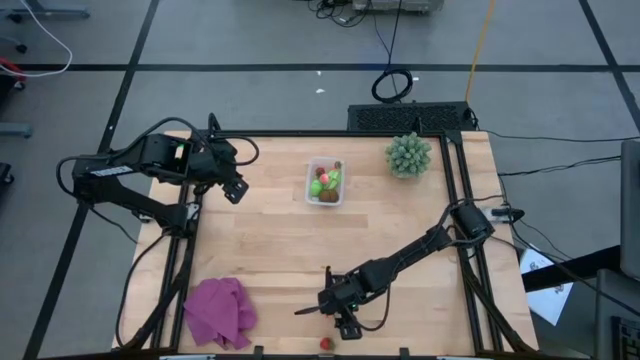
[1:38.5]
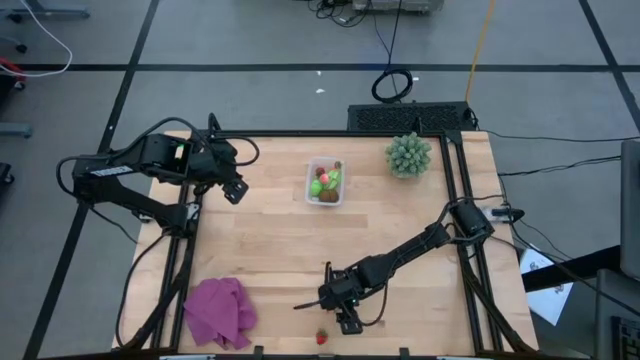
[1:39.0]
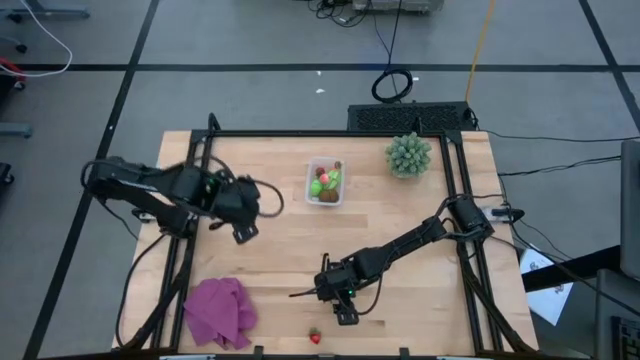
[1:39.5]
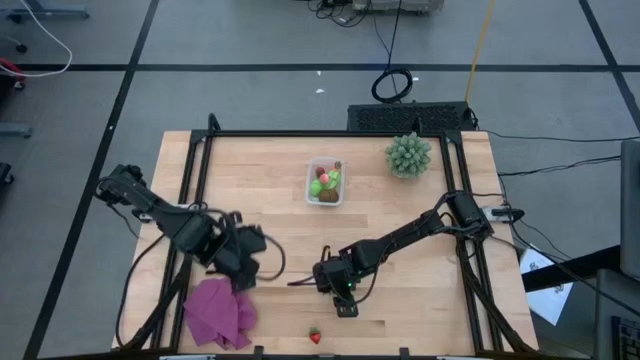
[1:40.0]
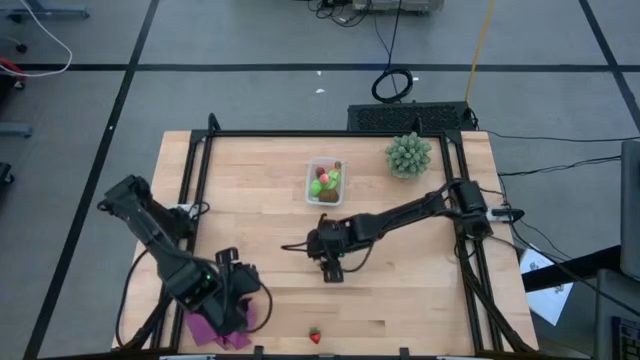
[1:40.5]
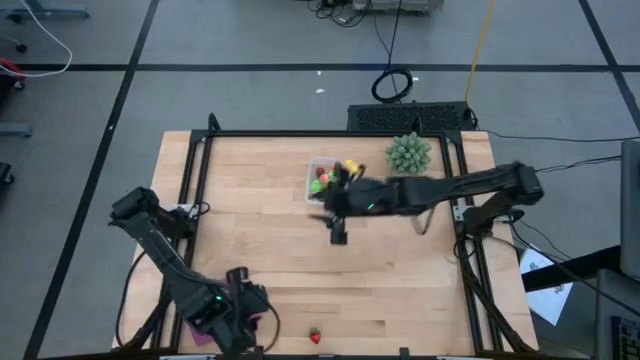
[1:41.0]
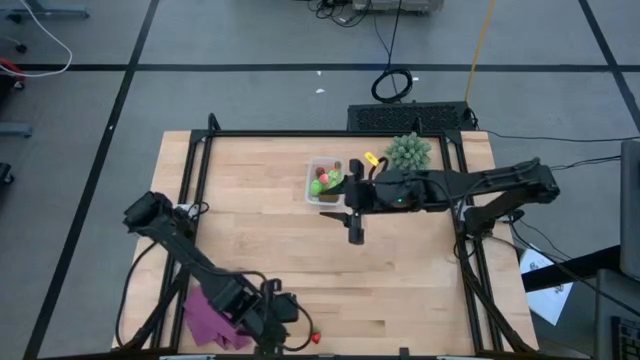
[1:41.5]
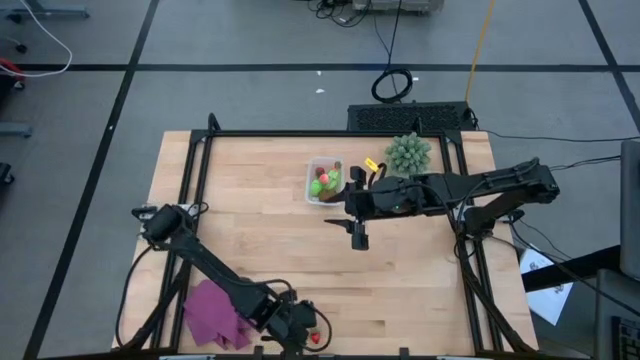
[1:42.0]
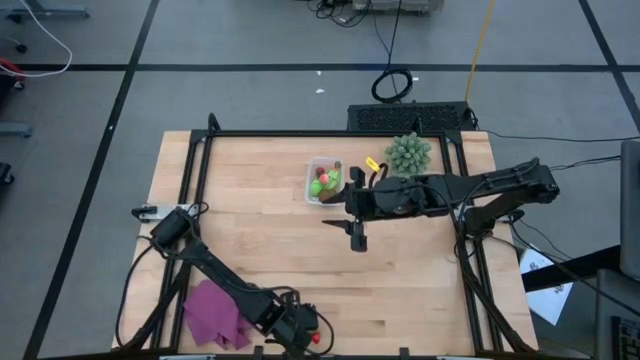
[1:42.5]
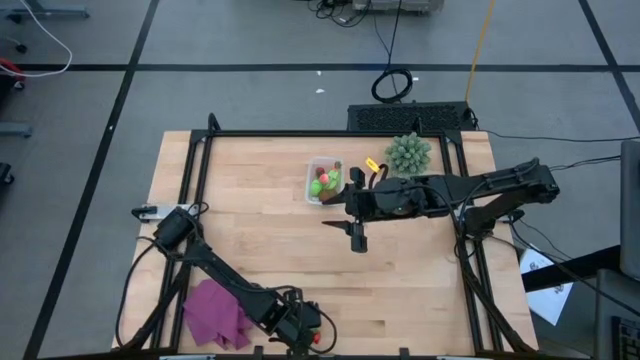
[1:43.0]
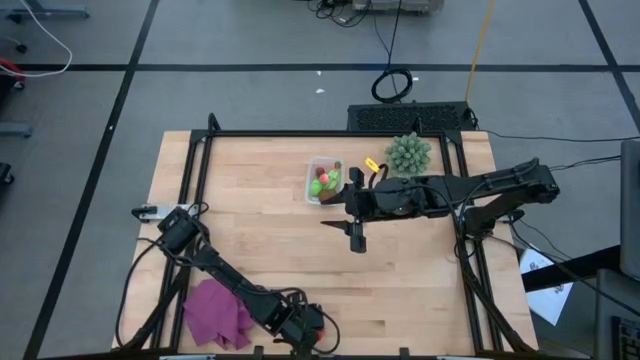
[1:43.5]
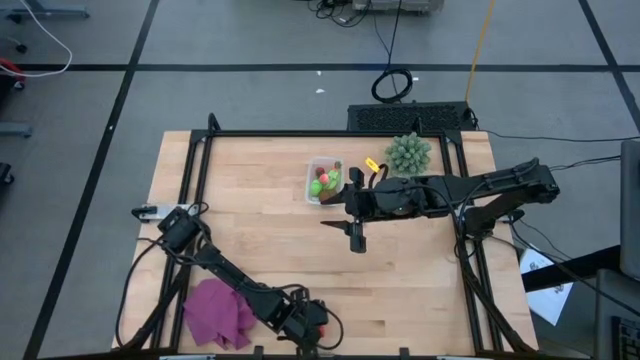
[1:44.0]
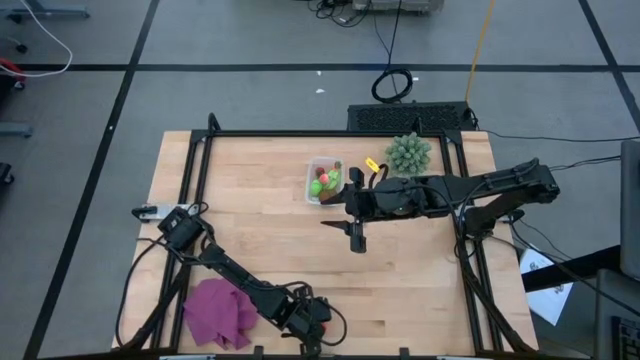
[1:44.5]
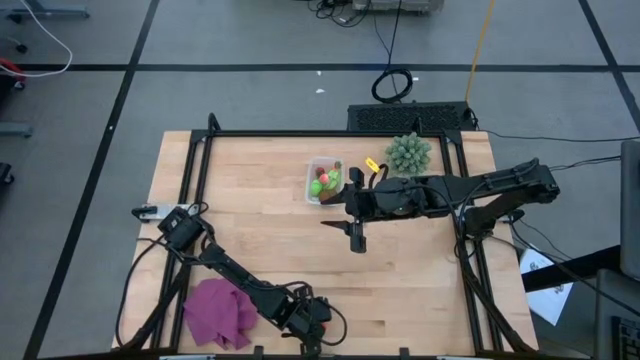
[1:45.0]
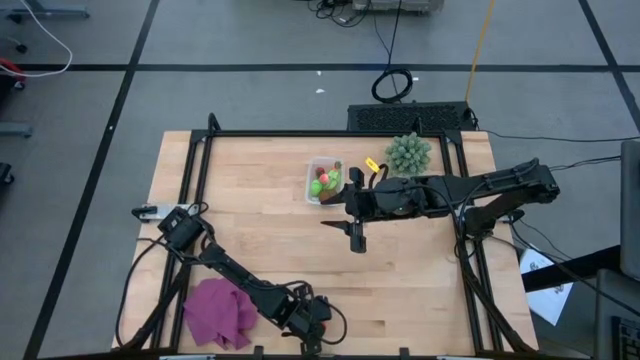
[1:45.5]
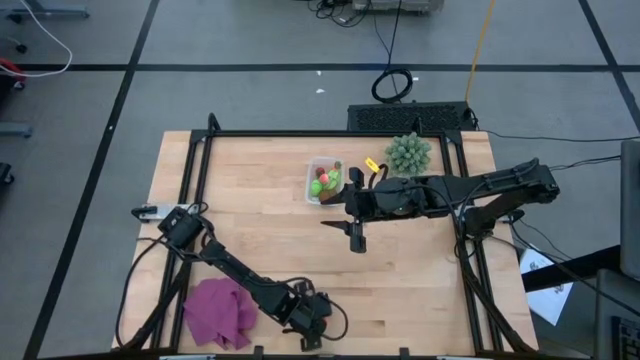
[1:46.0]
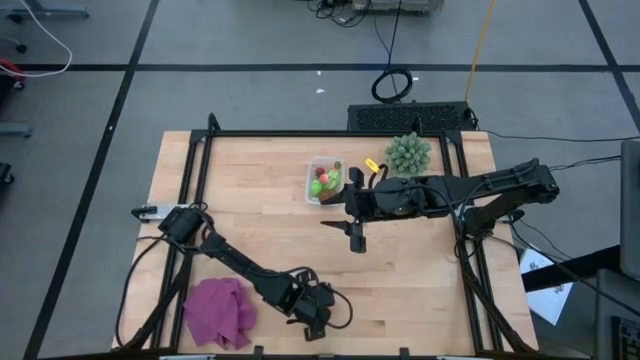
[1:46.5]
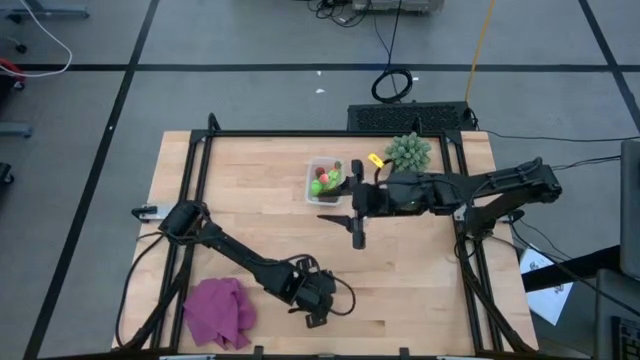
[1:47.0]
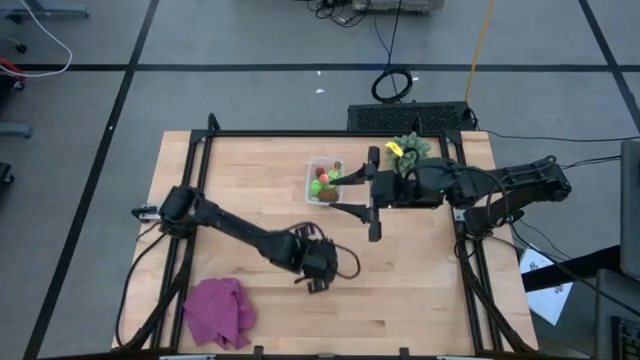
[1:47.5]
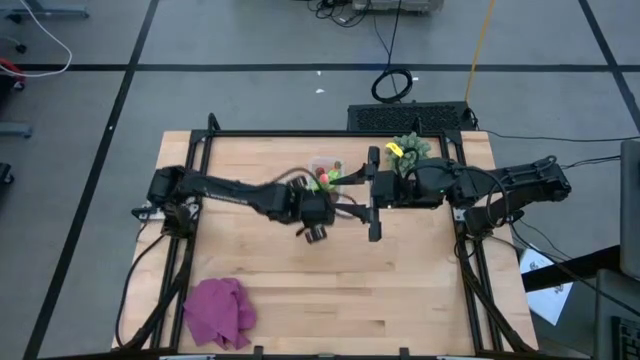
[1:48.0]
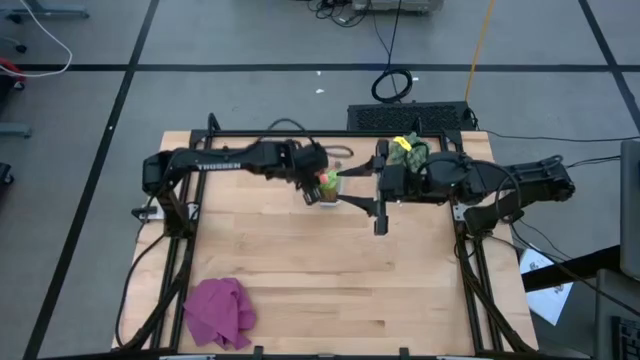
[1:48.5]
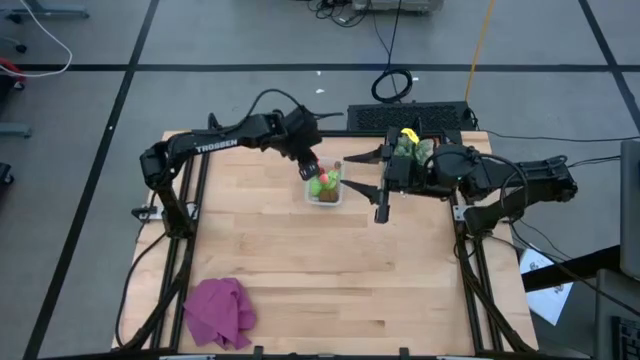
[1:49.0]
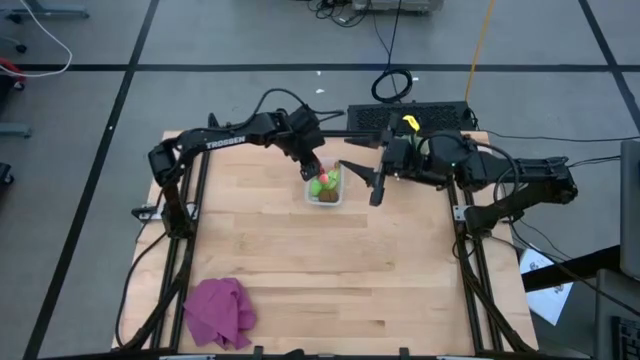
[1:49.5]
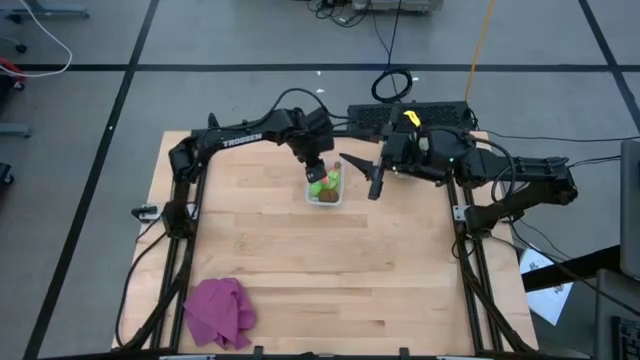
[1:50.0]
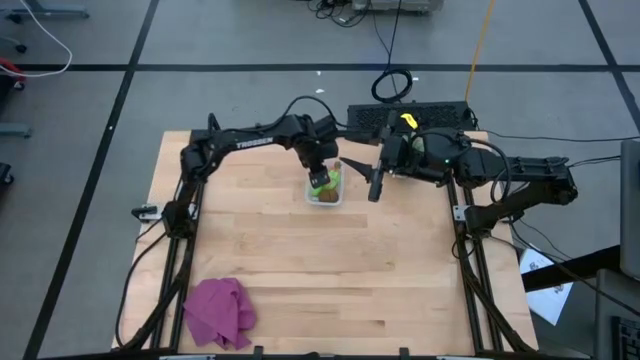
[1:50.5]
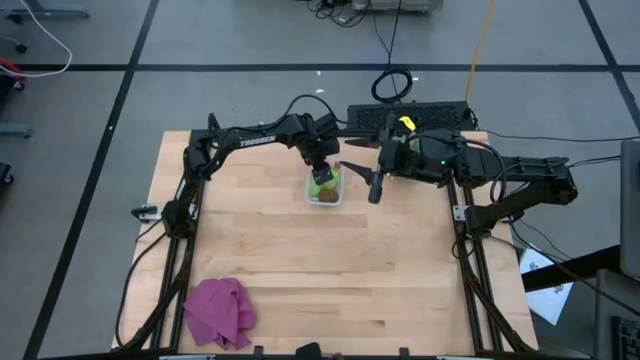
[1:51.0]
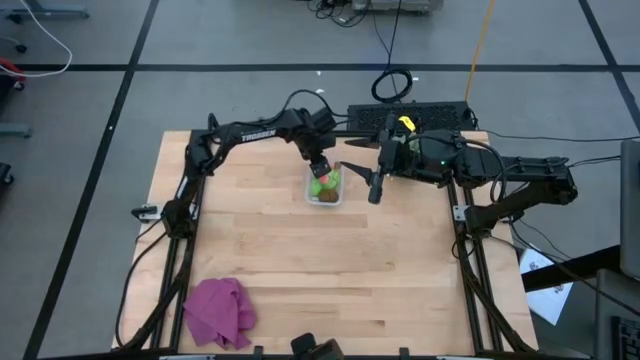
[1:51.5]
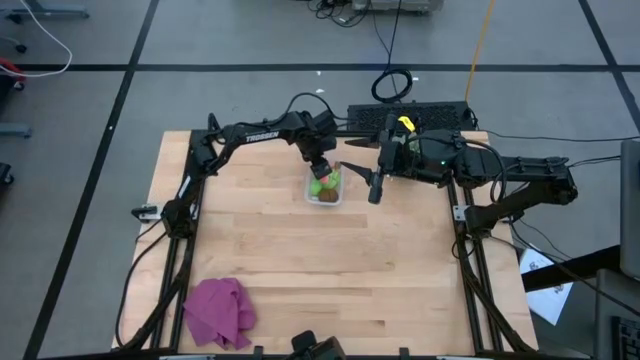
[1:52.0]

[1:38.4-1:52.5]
Task: Pick and placing Produce into tupperware
Put the strawberry into the transparent bin

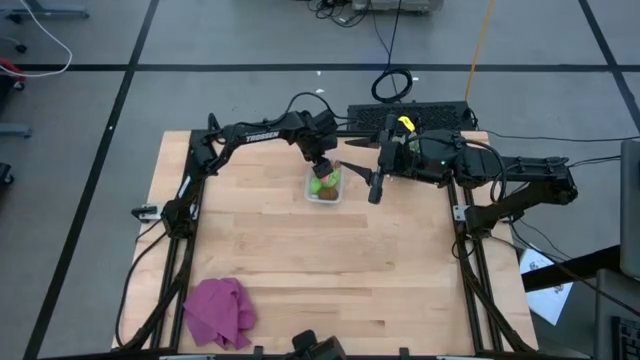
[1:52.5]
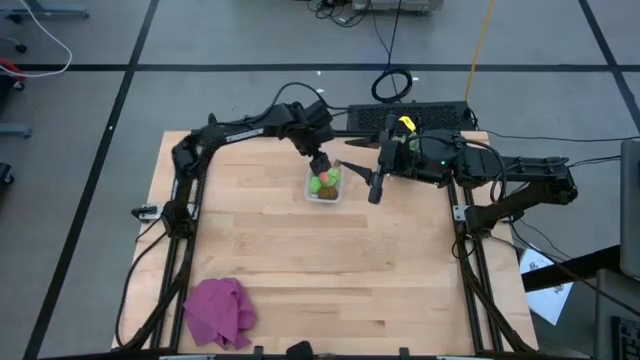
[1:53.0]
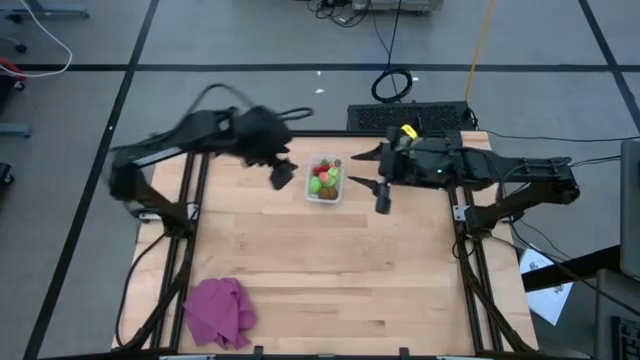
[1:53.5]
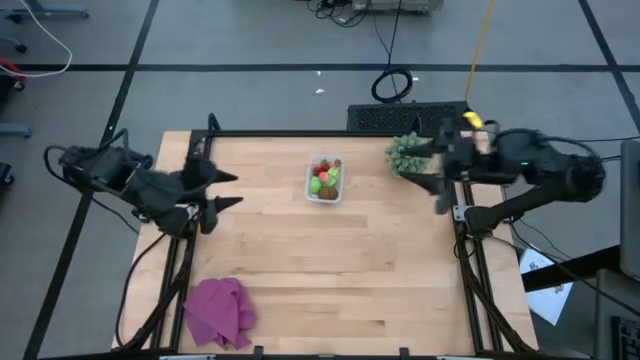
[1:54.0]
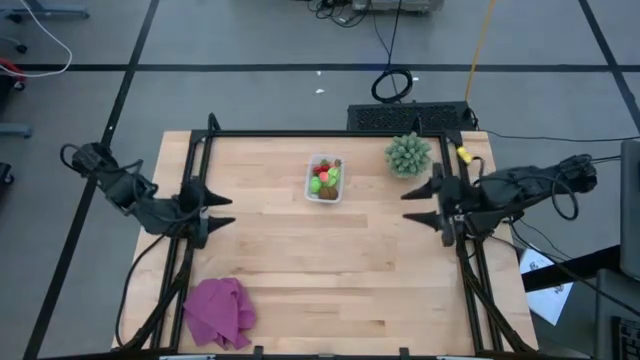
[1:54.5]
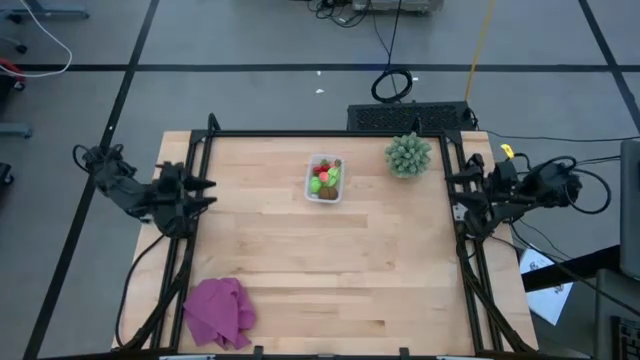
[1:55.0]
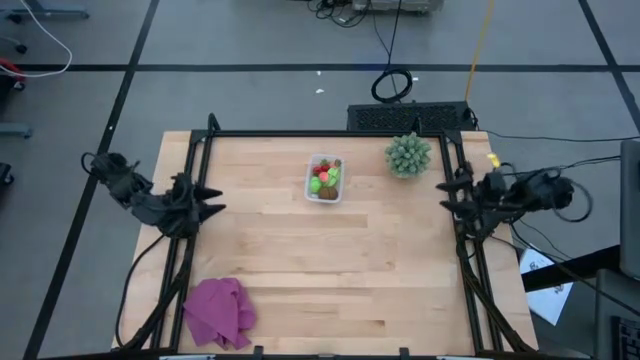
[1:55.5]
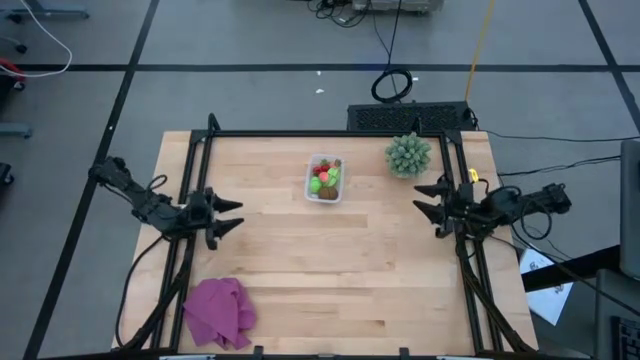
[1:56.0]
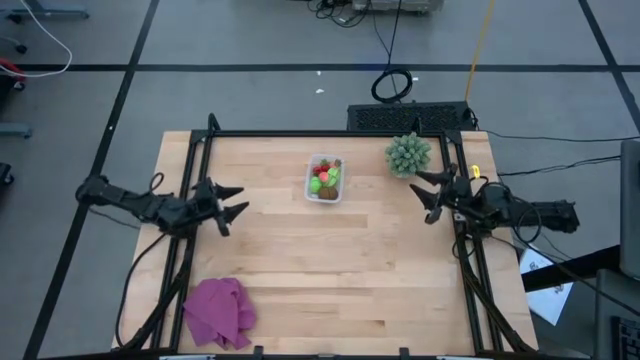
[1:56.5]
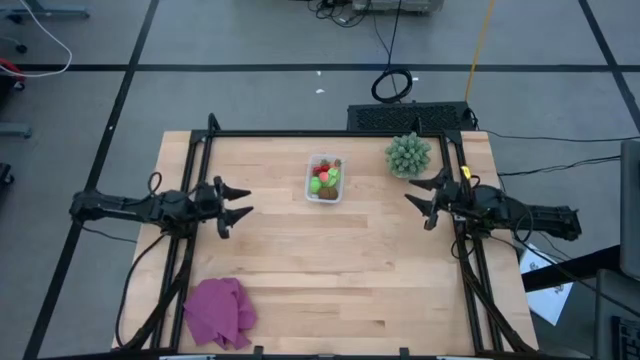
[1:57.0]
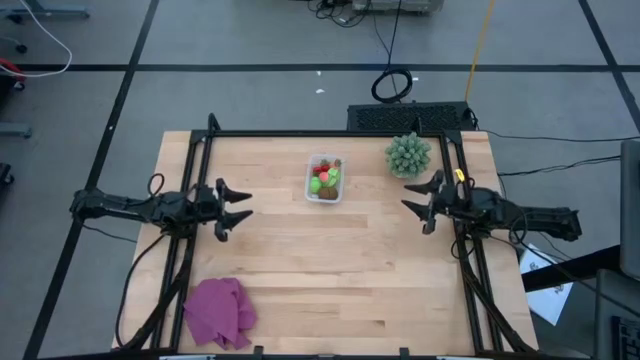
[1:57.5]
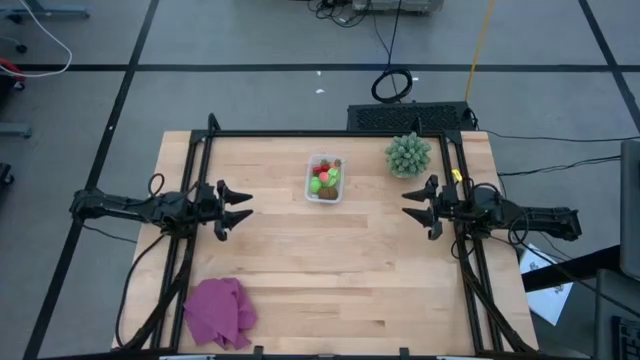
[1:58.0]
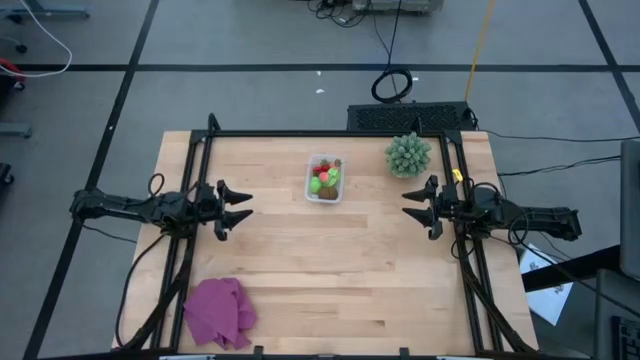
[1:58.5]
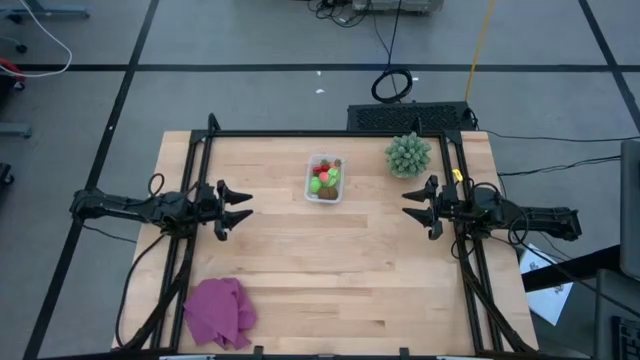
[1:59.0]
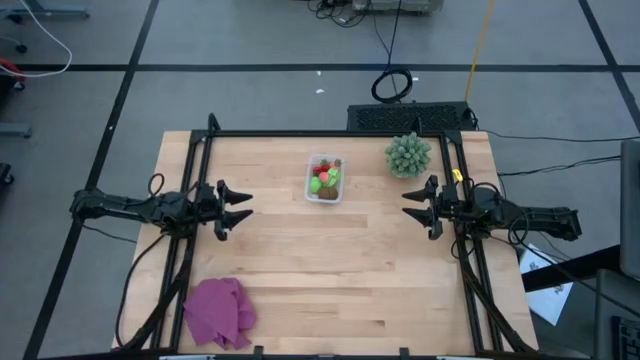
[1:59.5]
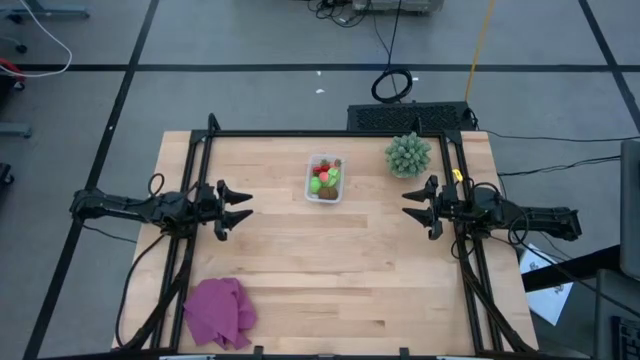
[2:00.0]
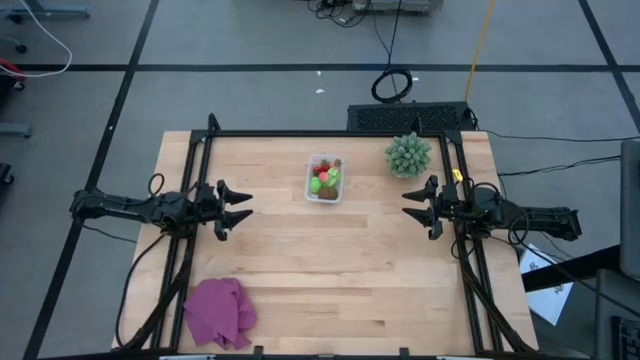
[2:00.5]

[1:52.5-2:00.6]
Return to Home Position
